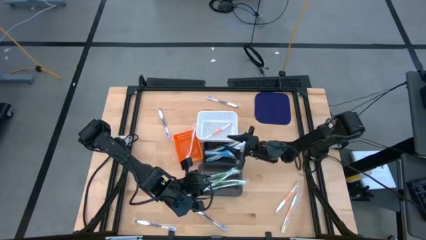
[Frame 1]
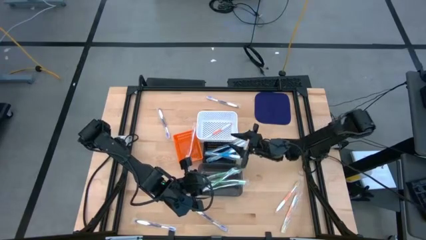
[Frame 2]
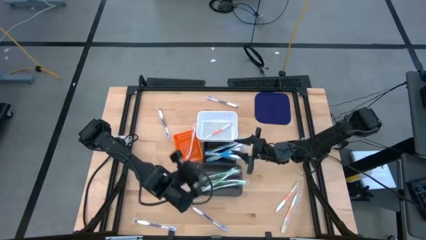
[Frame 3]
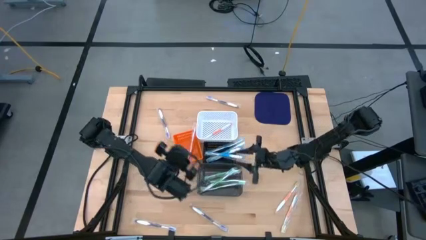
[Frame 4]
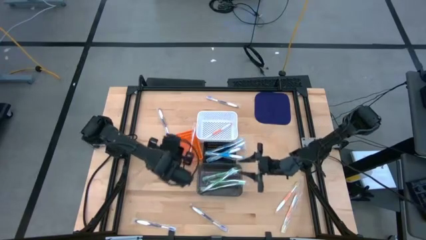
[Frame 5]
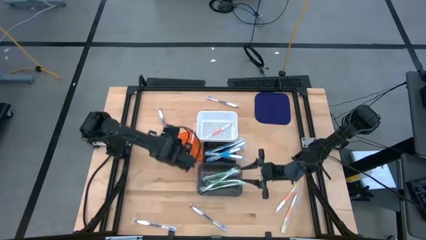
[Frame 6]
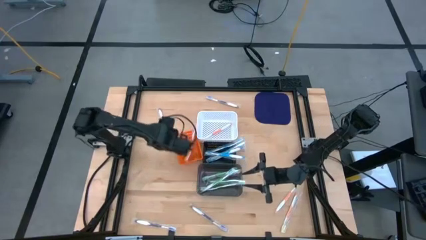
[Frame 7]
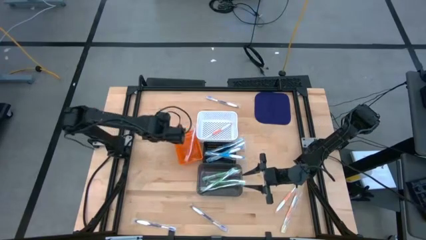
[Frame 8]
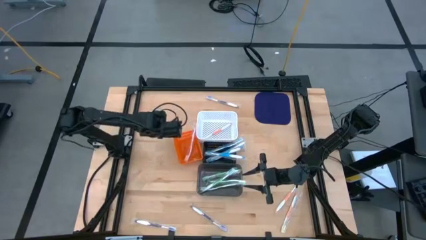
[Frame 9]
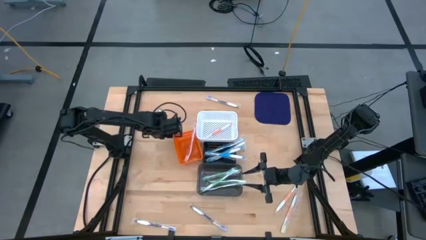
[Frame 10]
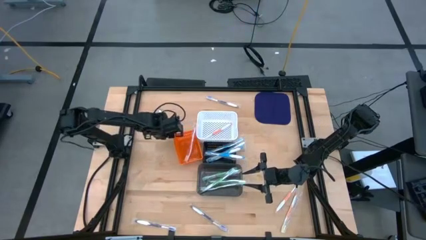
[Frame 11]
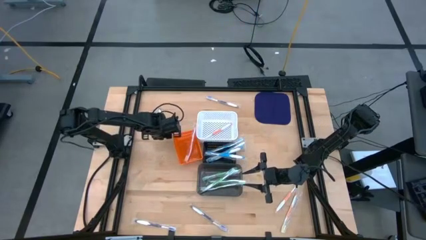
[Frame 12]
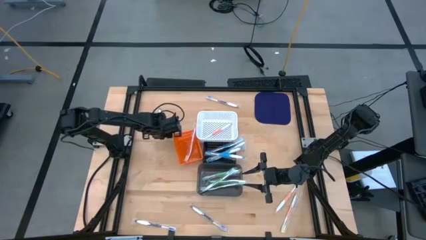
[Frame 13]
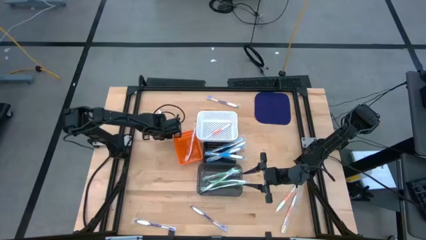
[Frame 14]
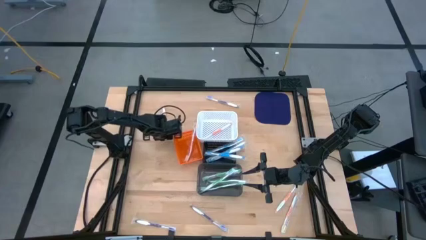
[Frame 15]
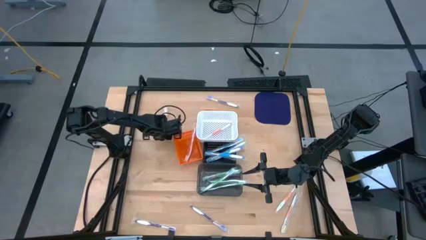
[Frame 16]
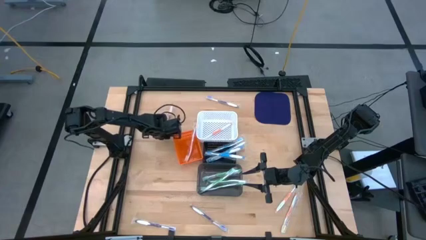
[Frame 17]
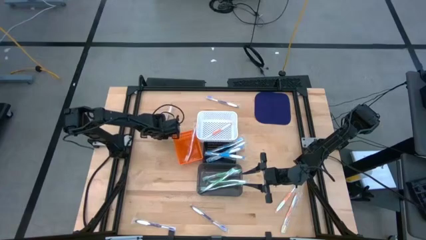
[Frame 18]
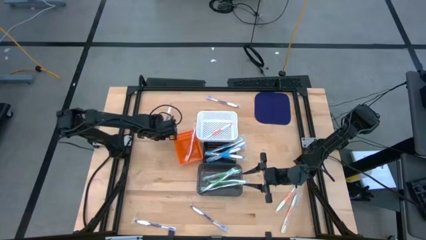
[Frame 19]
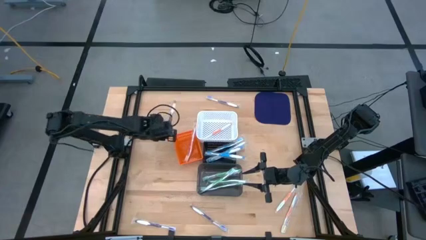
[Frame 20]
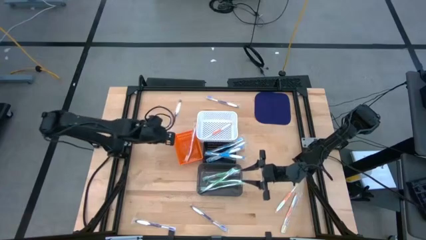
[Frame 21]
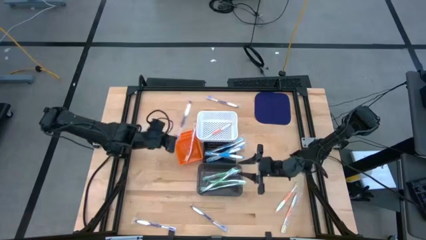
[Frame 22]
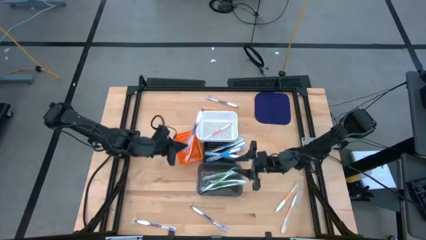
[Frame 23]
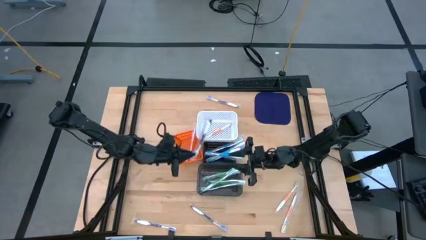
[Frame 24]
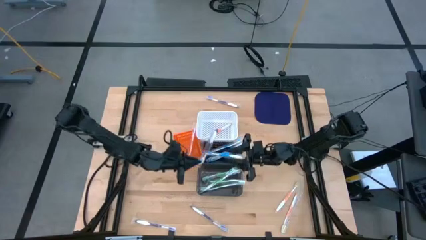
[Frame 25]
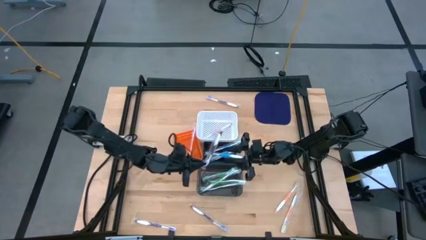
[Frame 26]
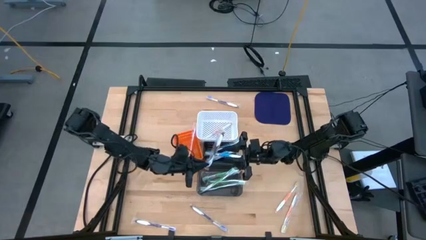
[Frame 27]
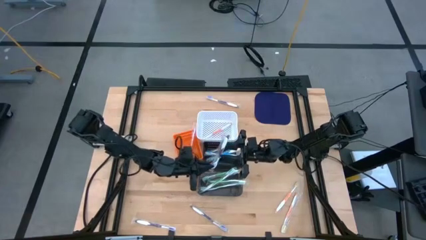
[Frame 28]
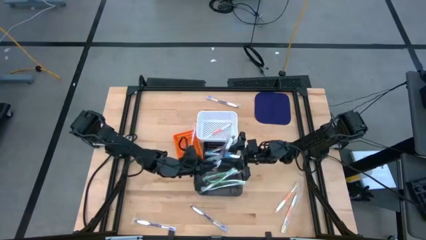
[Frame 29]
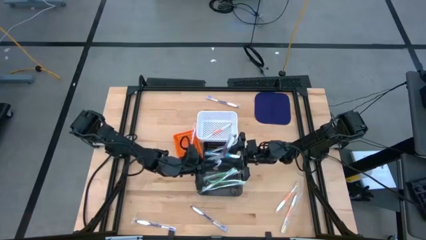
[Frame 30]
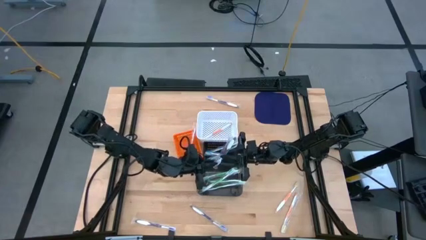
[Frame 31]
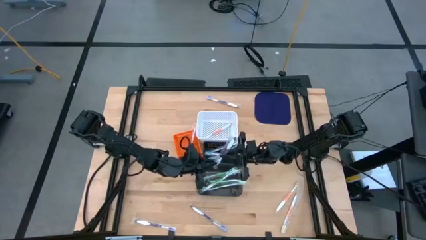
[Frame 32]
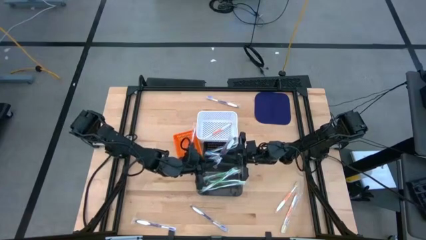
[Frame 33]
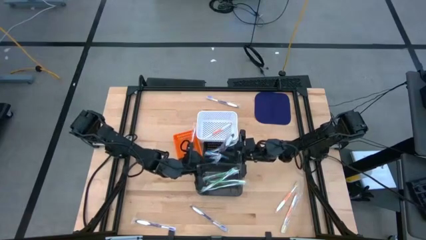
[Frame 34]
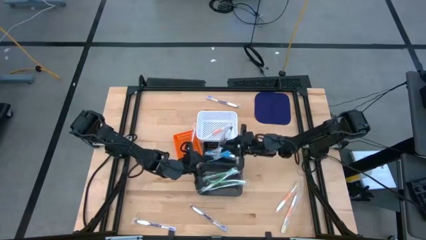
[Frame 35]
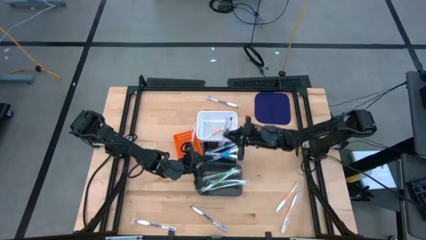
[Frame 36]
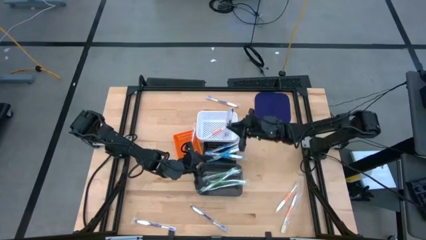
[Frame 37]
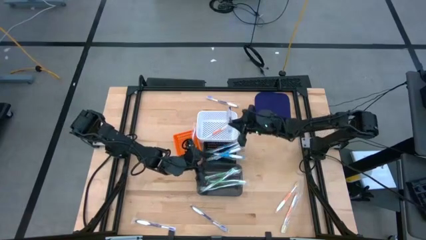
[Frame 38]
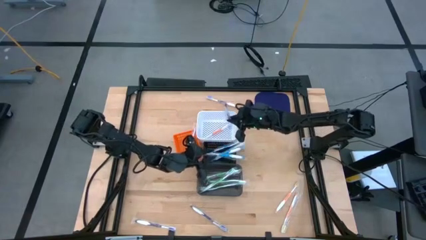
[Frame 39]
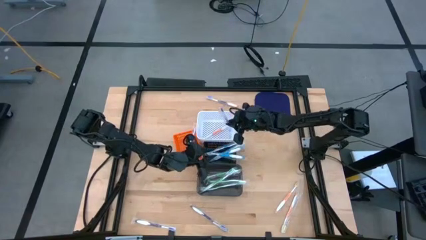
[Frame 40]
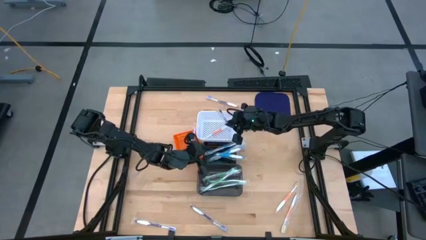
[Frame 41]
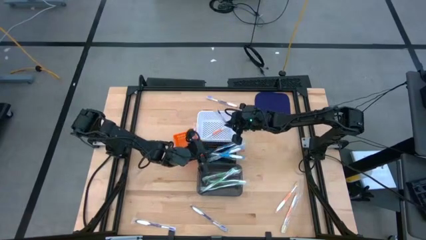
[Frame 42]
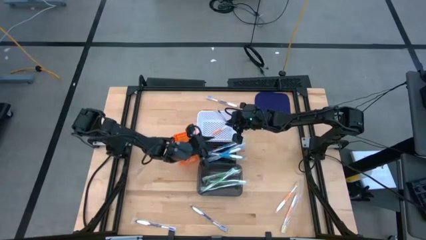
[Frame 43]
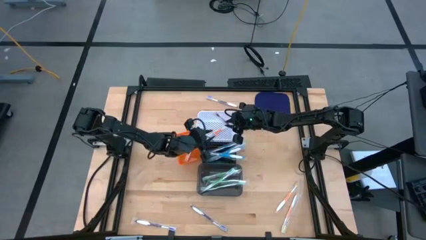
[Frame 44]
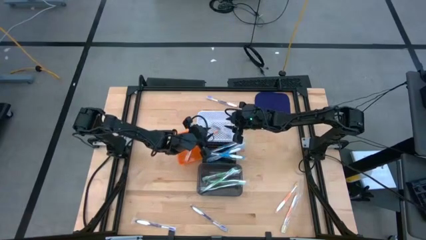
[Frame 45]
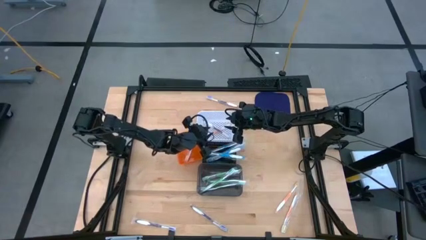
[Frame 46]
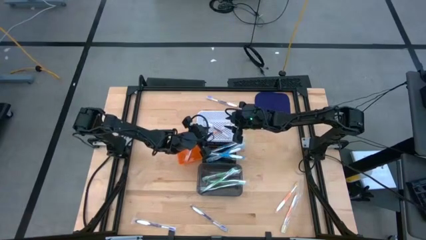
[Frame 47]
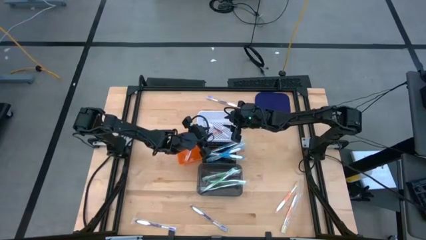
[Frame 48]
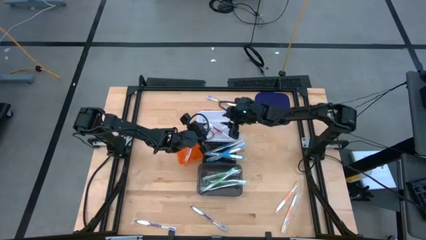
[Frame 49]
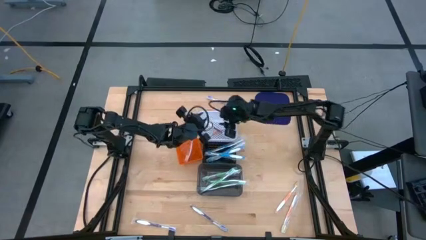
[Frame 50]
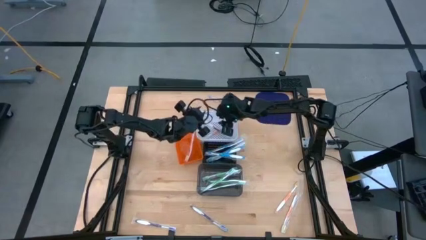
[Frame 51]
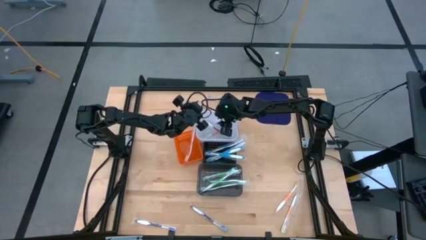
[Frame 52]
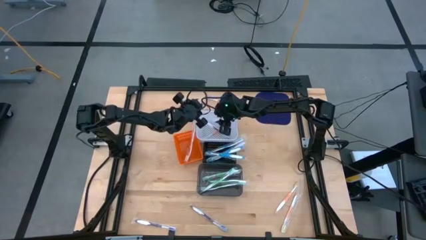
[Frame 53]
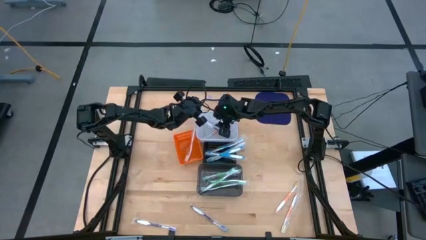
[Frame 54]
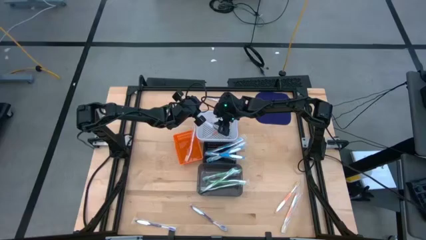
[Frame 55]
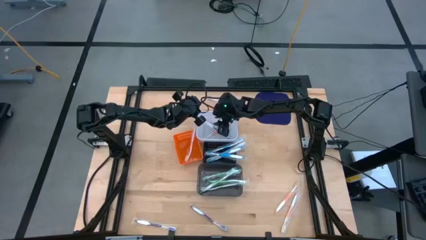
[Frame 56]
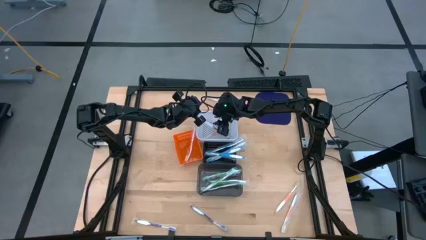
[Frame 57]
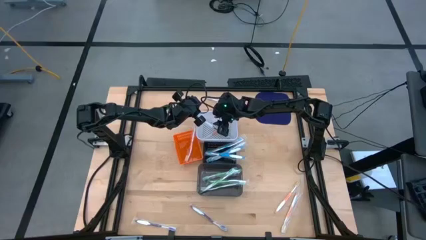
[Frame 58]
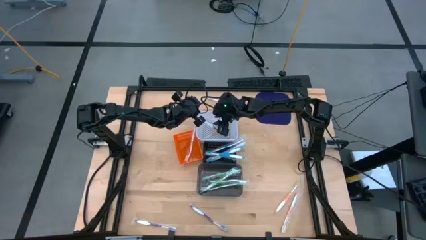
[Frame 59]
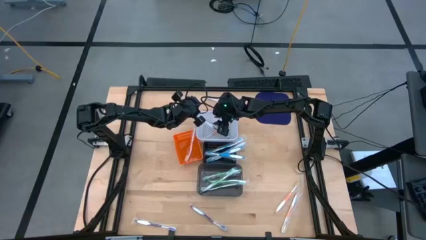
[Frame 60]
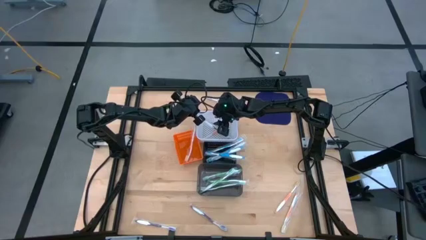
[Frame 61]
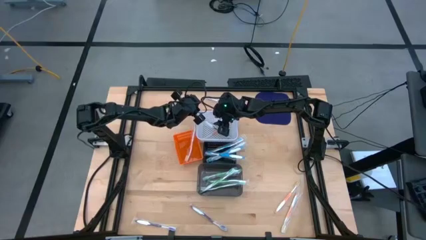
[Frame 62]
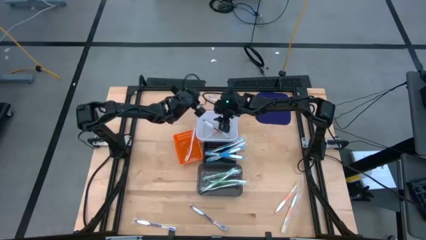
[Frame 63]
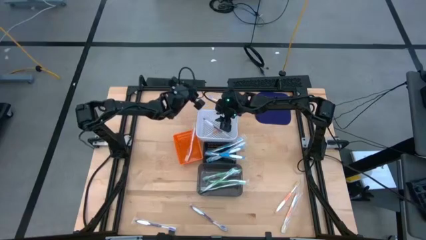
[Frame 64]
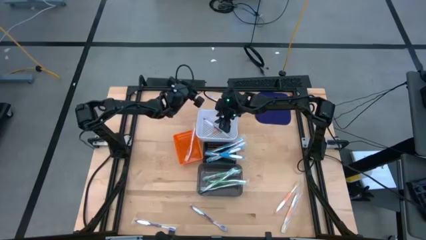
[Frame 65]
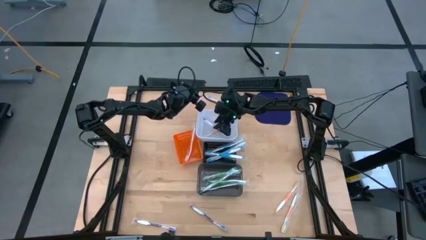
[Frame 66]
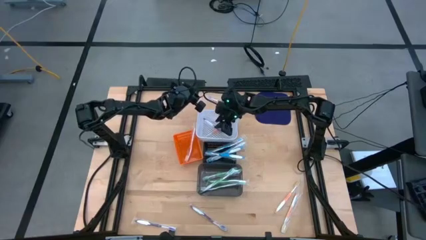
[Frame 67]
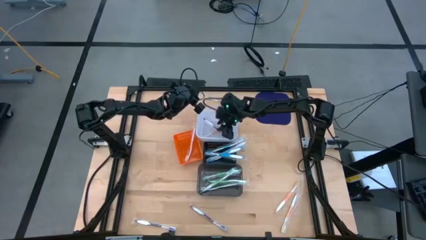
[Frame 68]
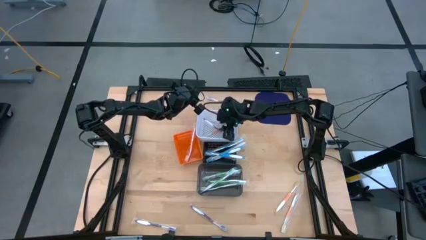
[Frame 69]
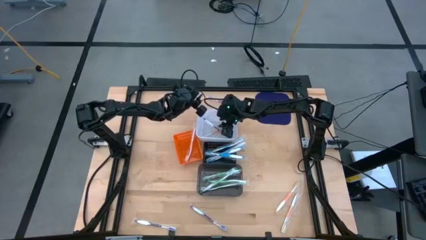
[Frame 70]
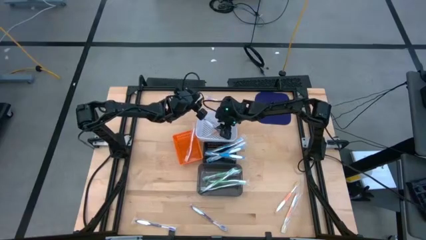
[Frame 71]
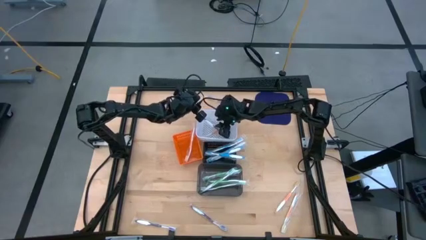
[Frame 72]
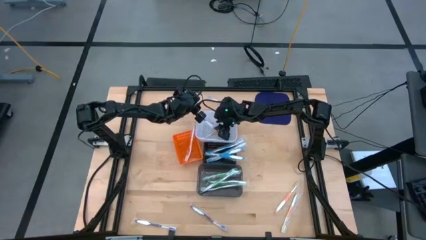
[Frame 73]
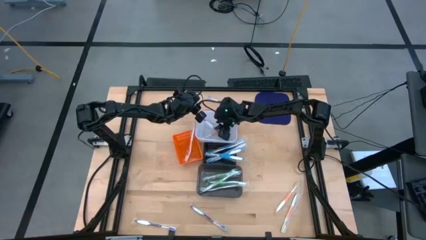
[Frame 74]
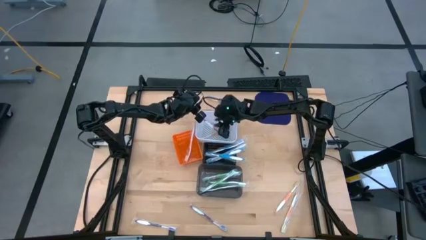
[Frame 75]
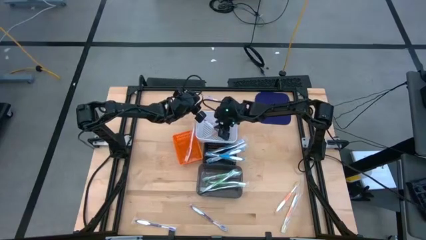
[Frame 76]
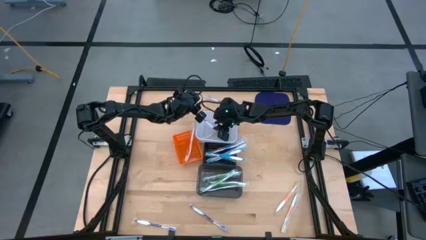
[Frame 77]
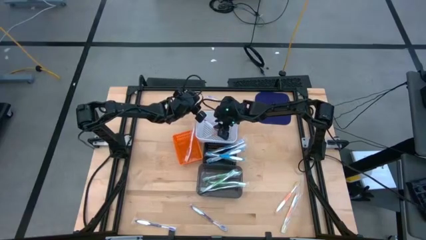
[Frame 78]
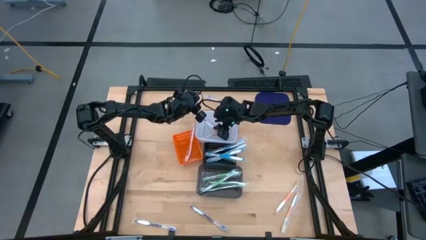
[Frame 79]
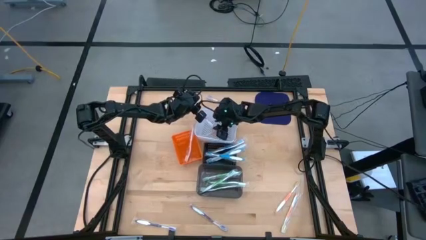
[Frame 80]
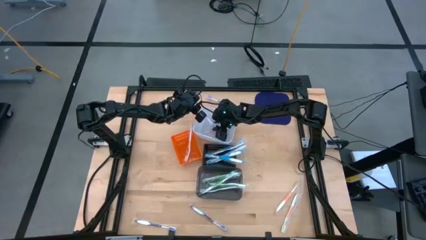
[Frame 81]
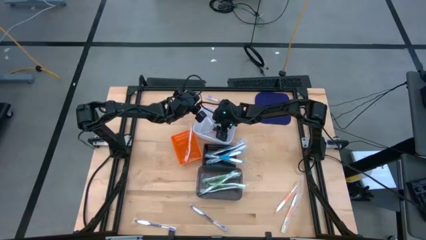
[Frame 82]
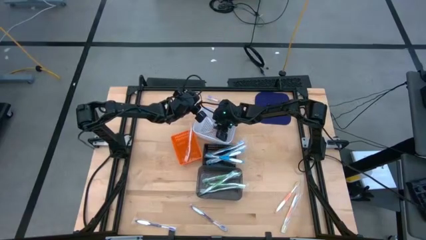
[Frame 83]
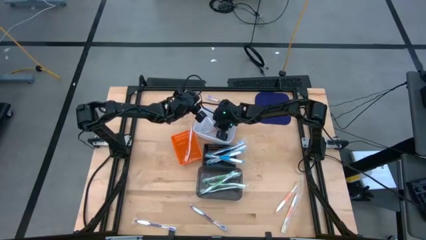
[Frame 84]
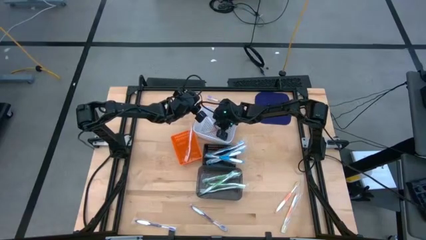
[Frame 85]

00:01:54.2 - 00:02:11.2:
Task: Pick & Place Toothbrushes
Put the purple toothbrush into the white basket
